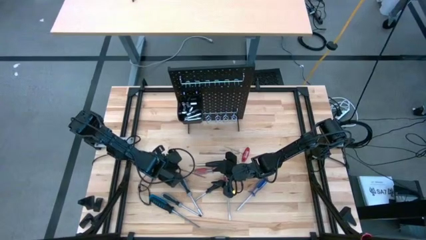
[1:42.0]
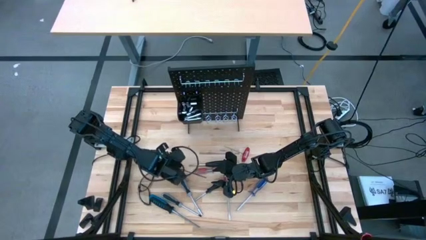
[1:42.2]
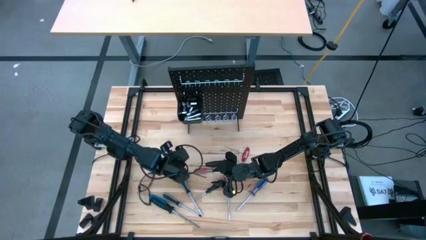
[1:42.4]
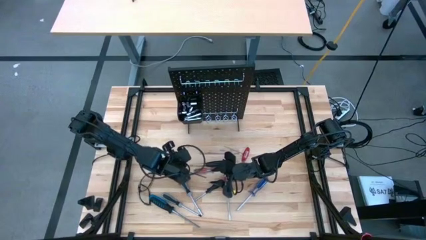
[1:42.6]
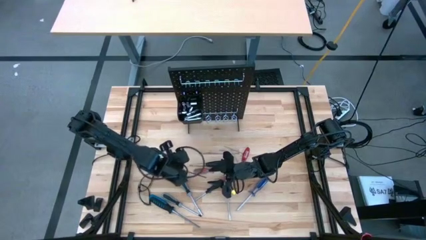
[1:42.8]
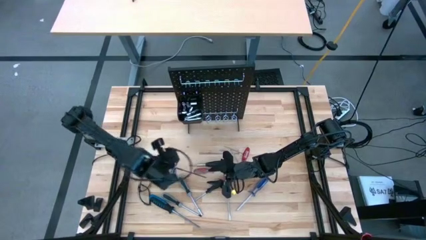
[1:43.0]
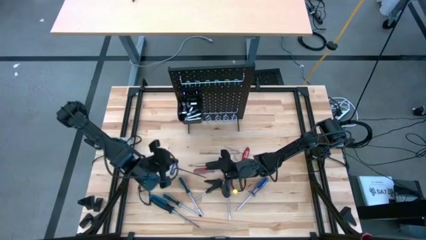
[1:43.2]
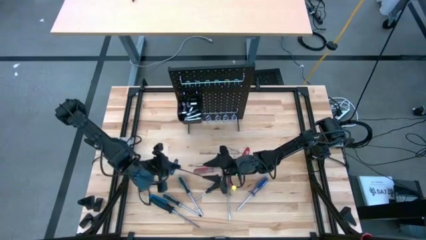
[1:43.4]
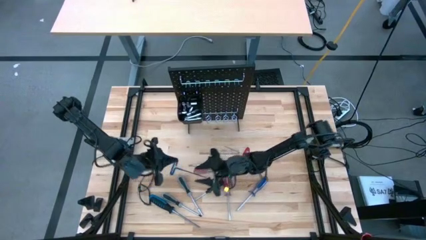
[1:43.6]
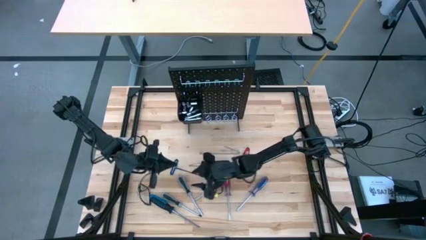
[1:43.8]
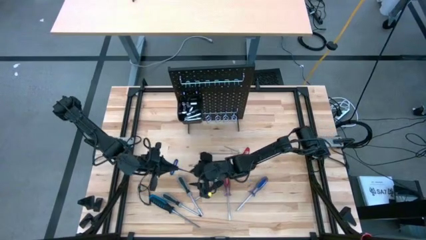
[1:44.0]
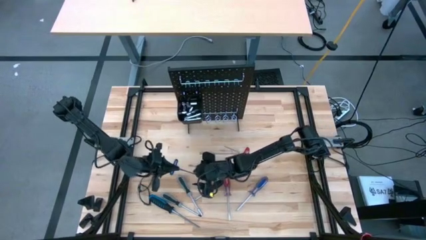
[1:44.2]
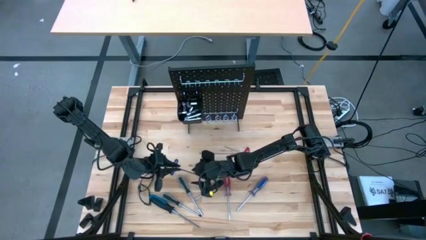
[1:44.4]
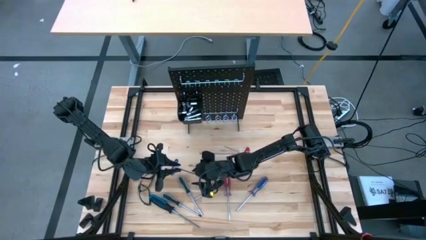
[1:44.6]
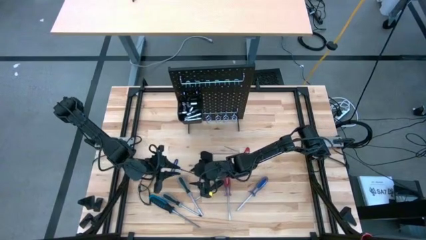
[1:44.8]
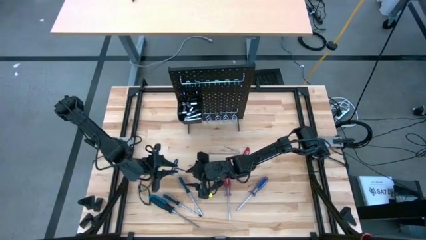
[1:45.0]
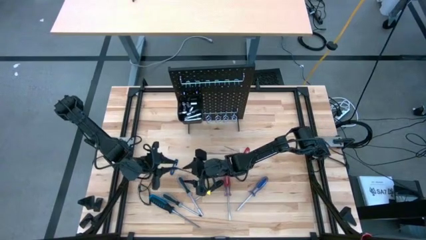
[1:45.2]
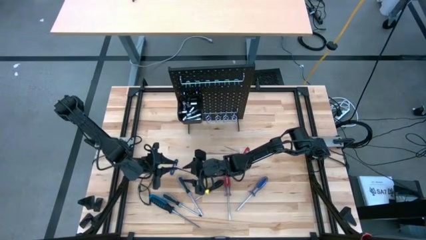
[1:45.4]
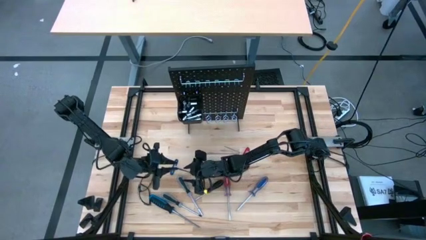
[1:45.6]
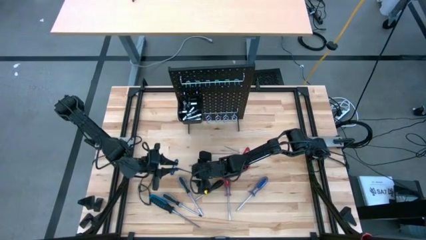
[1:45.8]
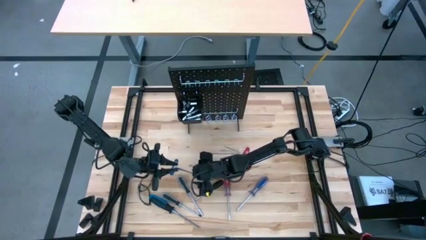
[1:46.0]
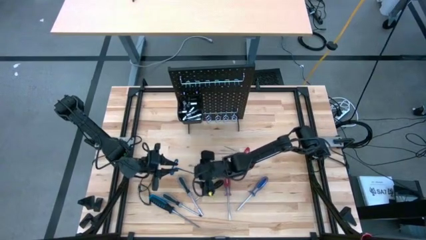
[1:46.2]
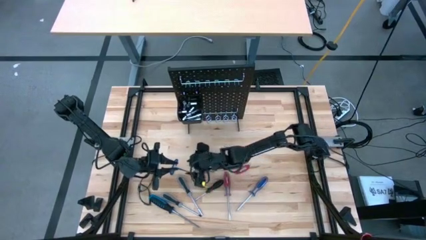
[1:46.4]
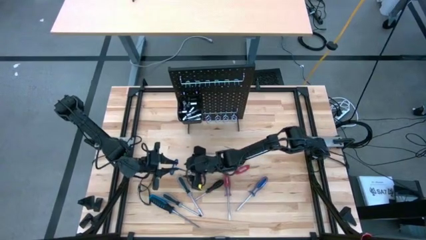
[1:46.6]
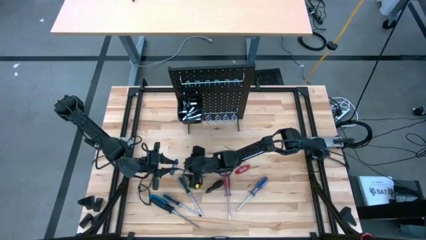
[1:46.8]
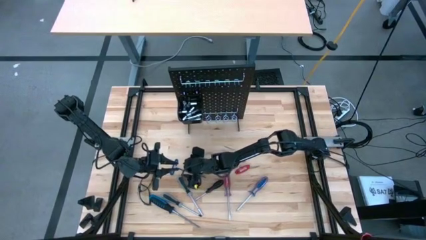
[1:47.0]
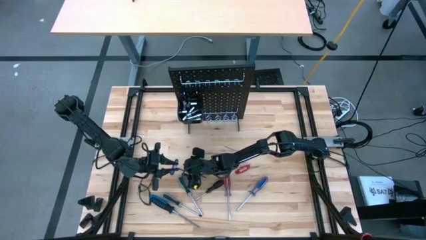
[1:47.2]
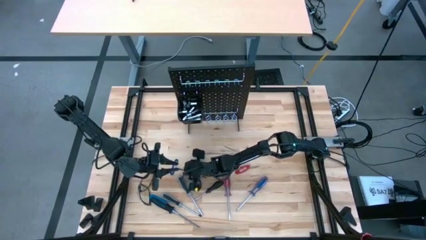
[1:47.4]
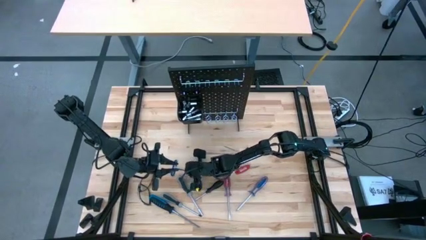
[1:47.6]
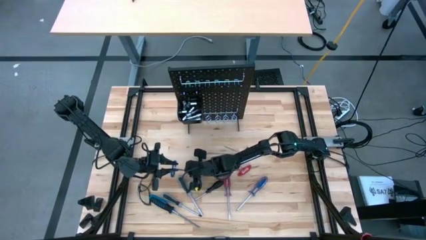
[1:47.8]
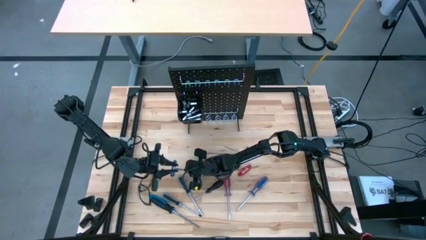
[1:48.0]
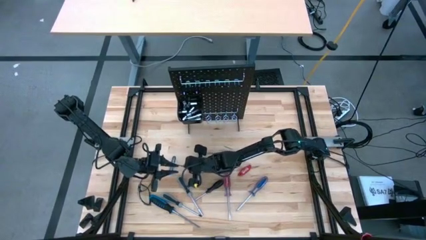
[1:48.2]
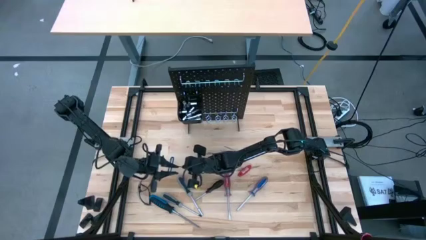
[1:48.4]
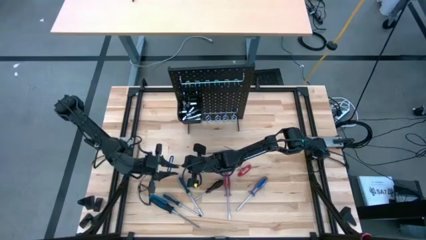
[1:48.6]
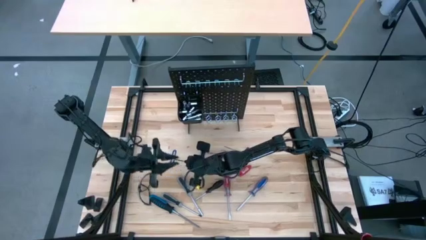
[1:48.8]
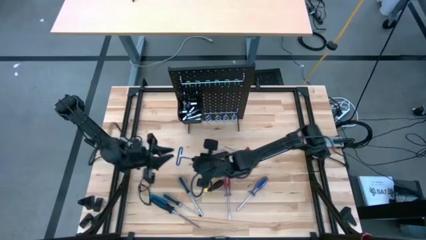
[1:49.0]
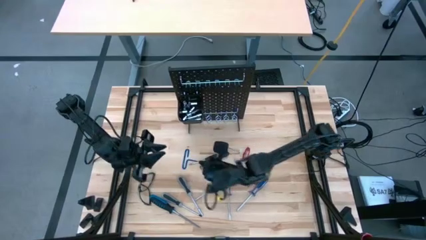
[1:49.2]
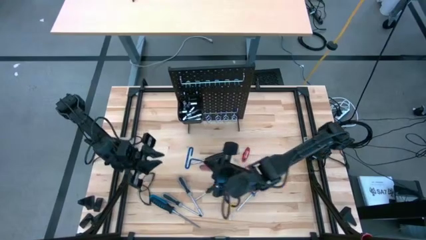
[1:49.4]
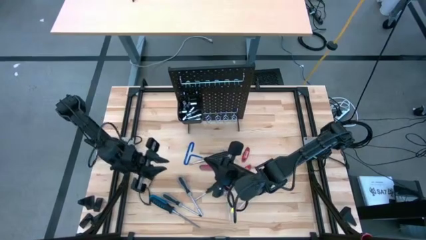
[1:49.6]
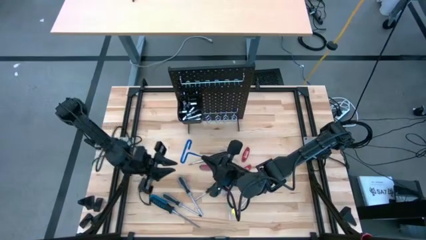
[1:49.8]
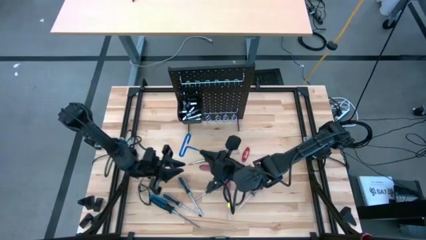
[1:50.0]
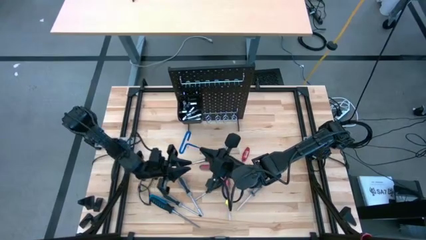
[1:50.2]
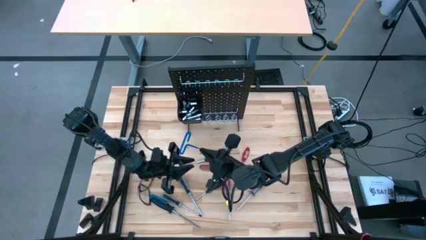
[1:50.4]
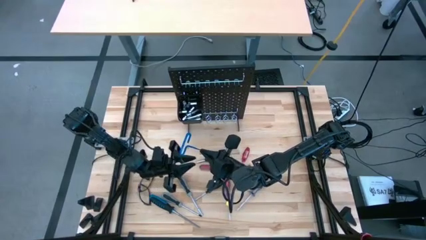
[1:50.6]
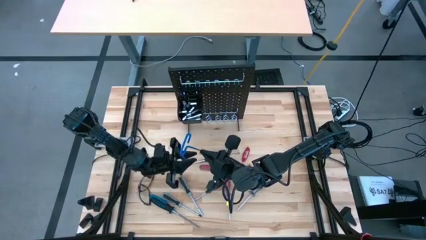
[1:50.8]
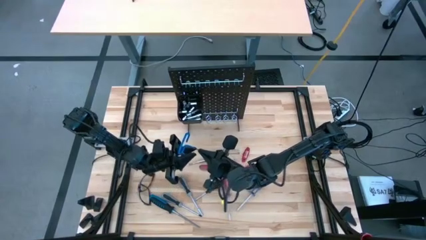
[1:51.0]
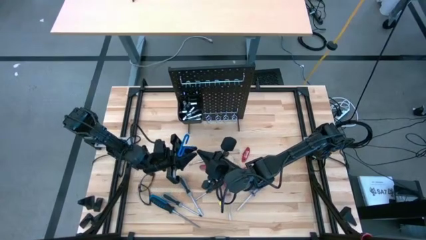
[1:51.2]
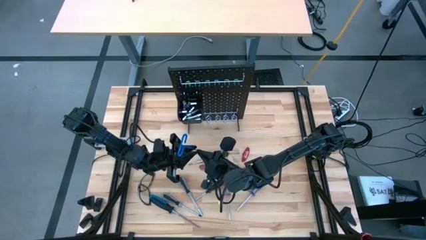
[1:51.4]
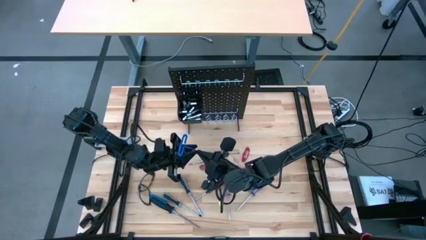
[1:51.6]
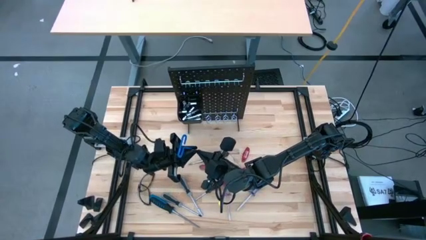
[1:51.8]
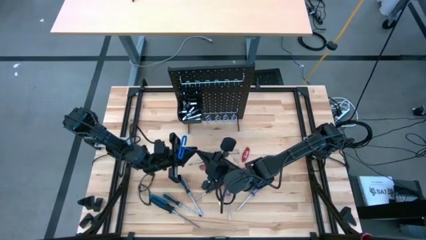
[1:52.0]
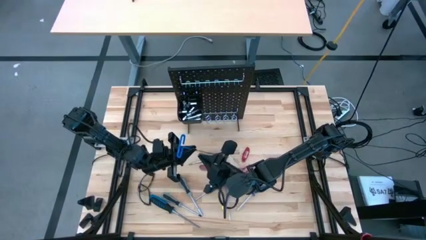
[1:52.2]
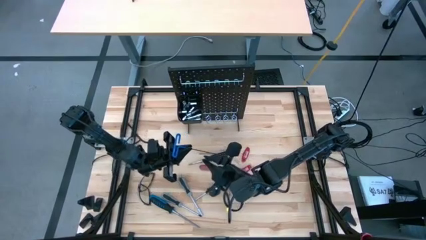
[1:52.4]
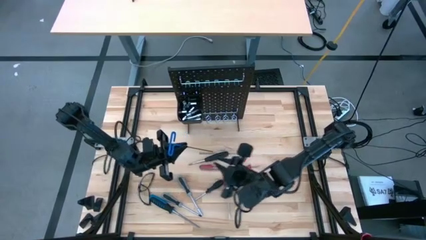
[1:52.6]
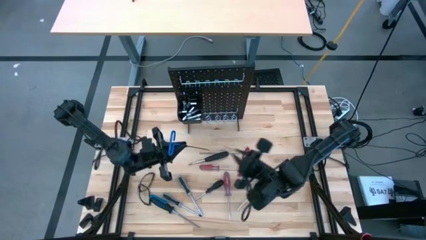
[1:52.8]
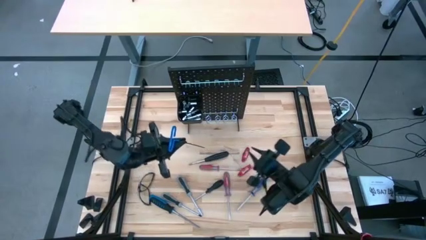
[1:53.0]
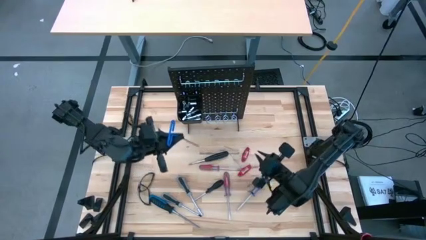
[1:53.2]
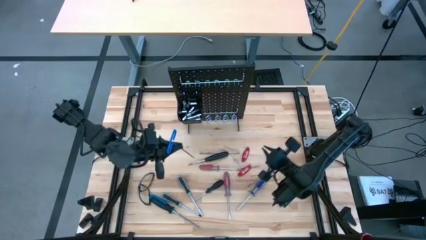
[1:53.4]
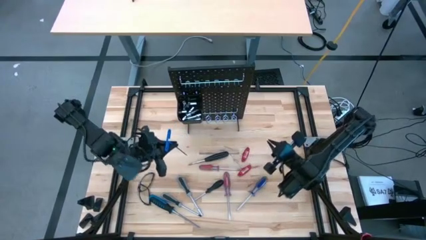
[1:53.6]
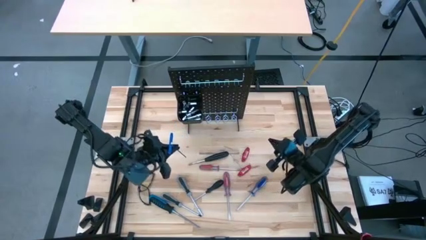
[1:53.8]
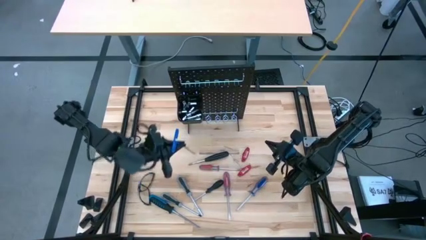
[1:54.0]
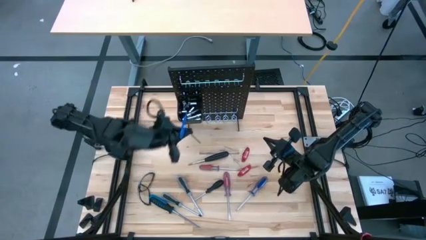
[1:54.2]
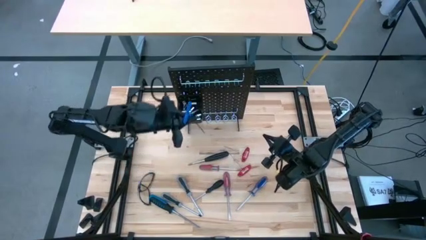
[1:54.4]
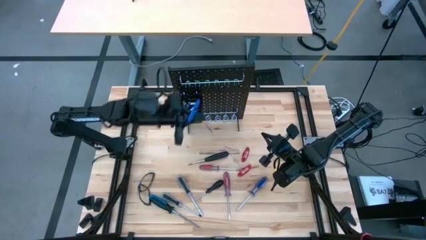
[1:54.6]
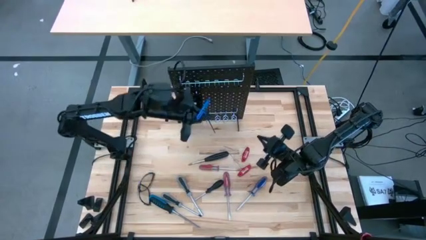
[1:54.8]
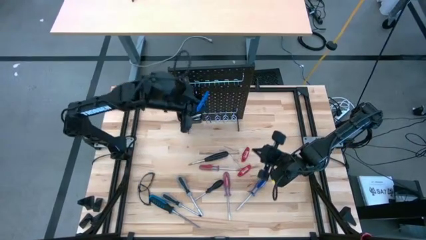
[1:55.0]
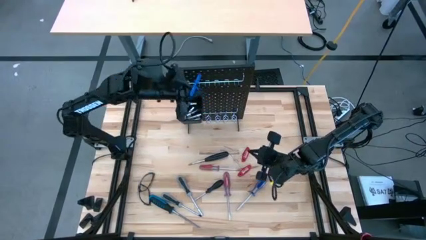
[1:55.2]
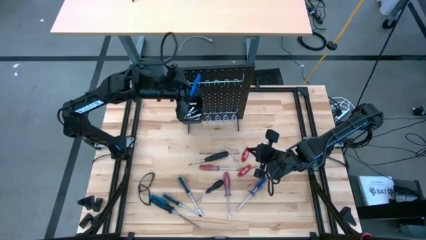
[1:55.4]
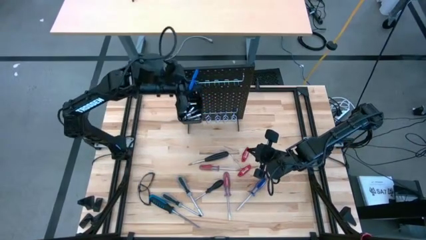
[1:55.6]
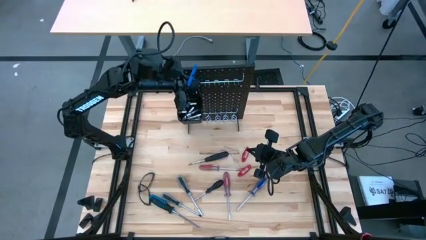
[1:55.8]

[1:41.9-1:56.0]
Task: Hang tools onto peg board
Hang the pick tool on the pegboard
